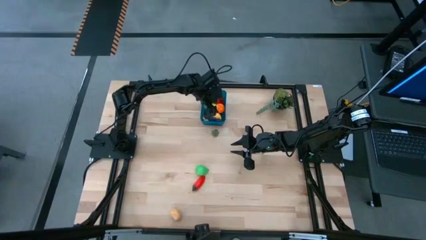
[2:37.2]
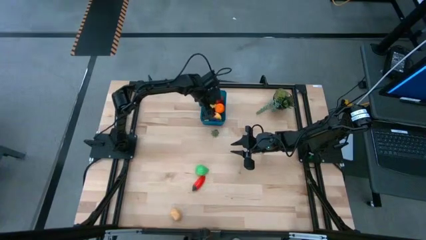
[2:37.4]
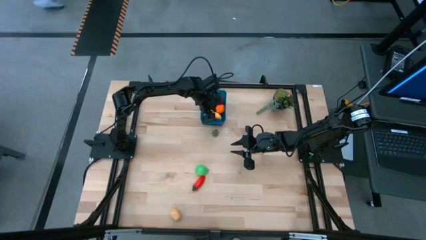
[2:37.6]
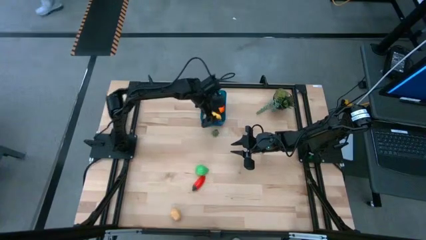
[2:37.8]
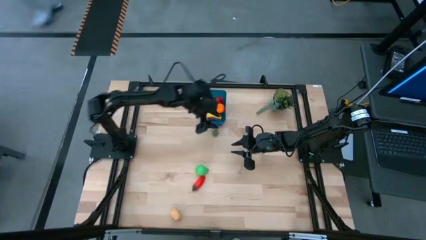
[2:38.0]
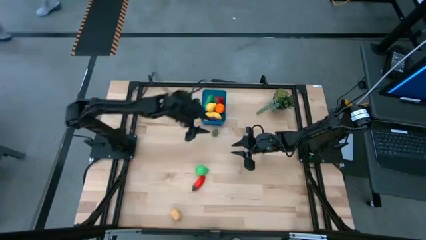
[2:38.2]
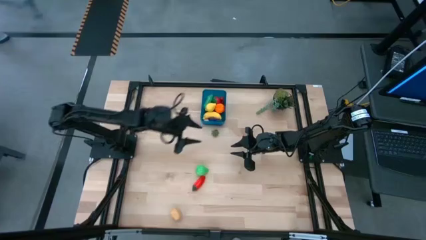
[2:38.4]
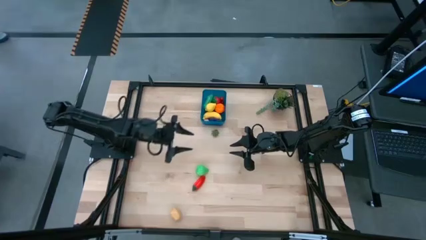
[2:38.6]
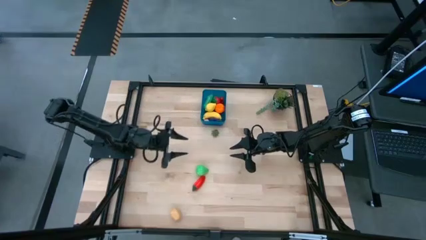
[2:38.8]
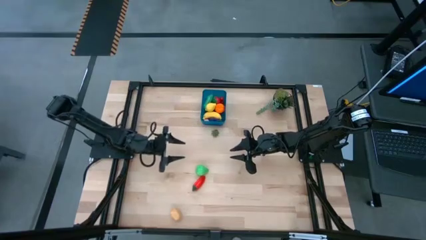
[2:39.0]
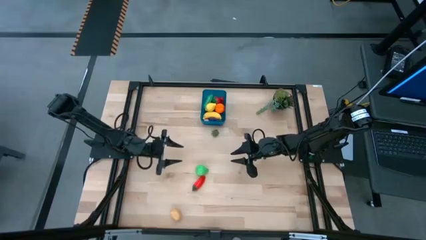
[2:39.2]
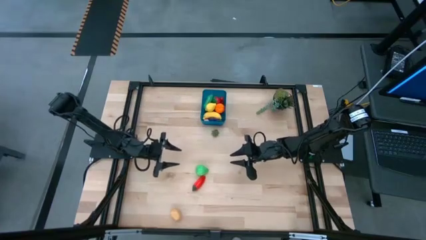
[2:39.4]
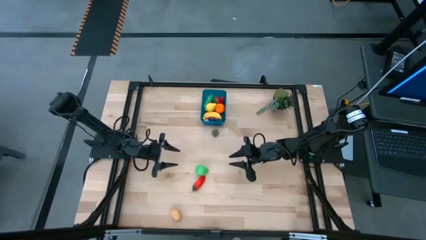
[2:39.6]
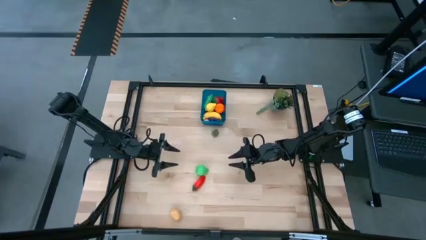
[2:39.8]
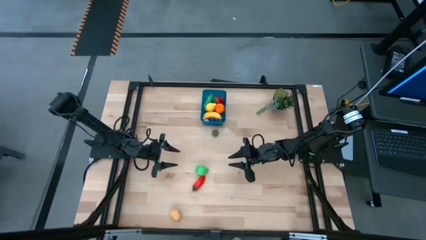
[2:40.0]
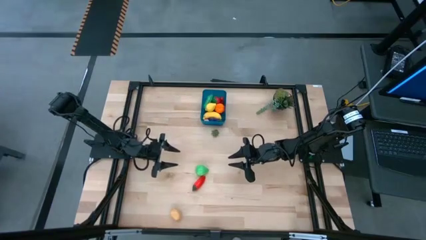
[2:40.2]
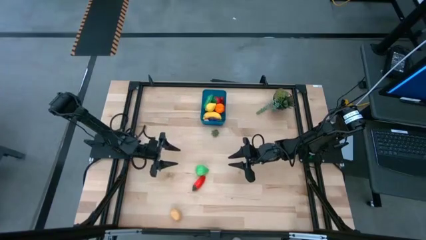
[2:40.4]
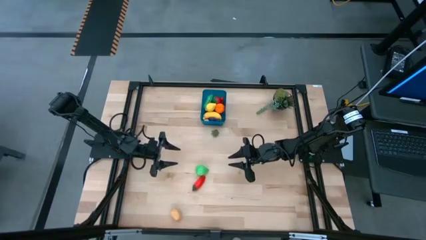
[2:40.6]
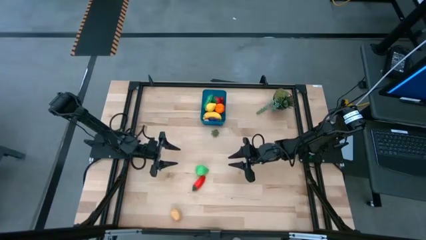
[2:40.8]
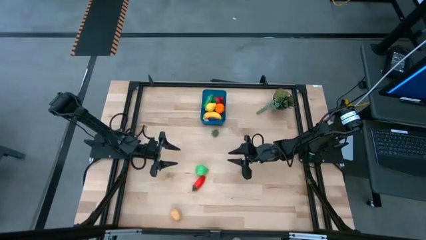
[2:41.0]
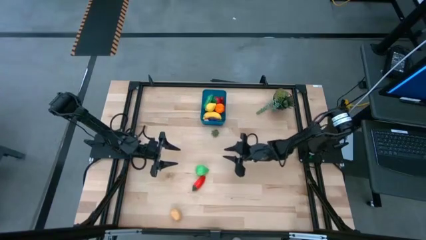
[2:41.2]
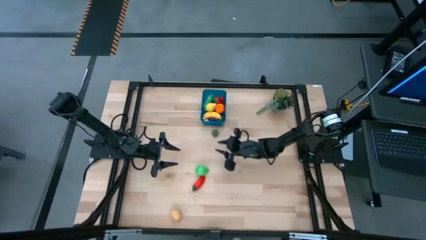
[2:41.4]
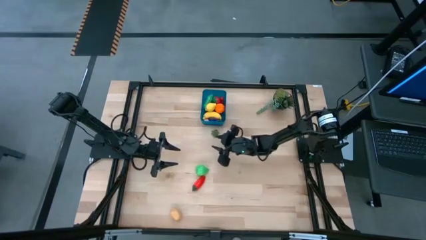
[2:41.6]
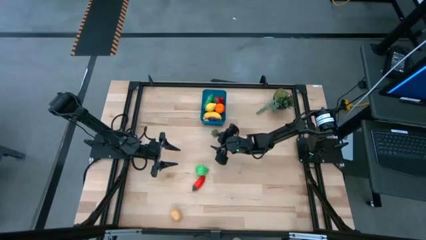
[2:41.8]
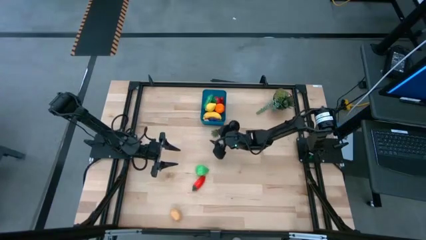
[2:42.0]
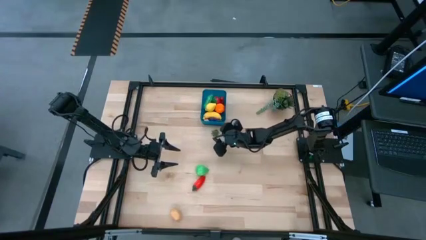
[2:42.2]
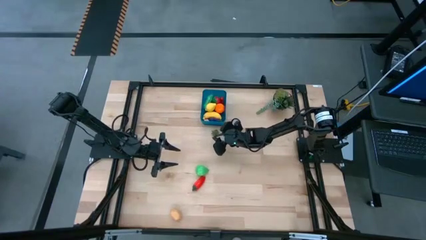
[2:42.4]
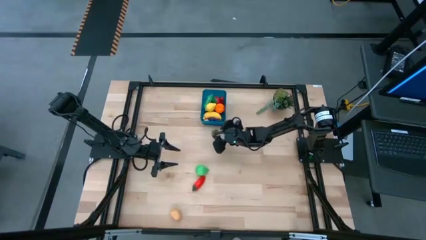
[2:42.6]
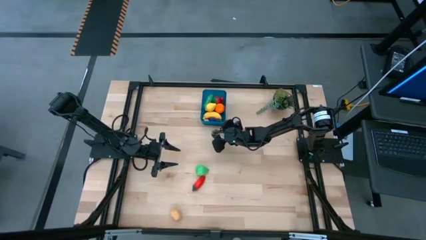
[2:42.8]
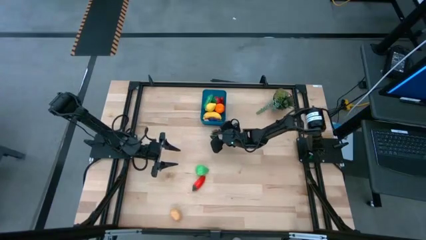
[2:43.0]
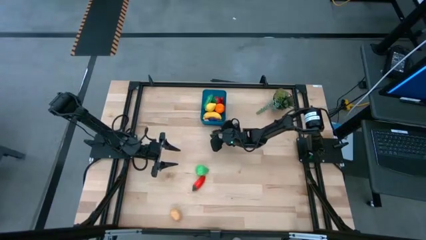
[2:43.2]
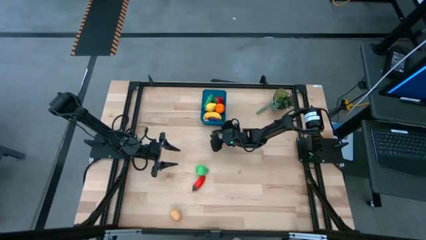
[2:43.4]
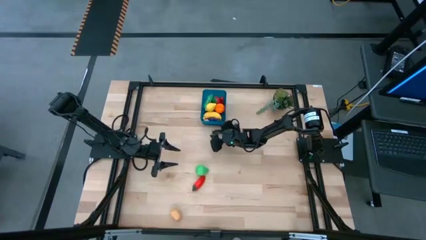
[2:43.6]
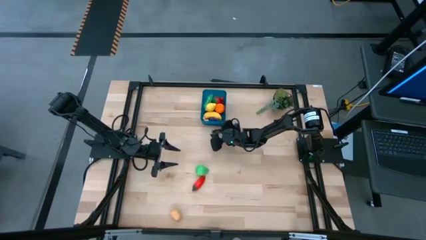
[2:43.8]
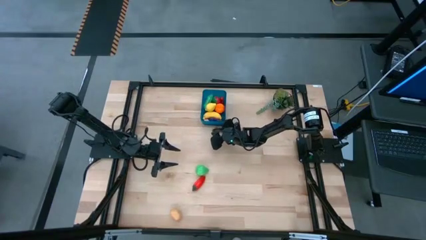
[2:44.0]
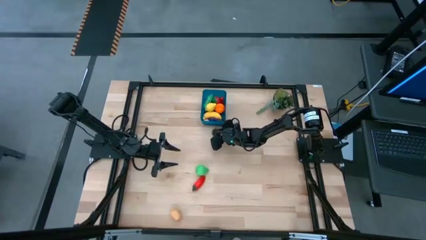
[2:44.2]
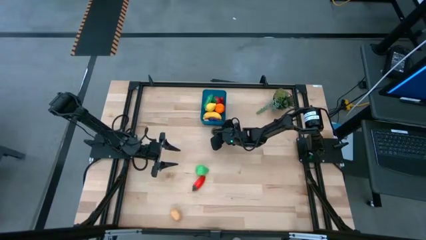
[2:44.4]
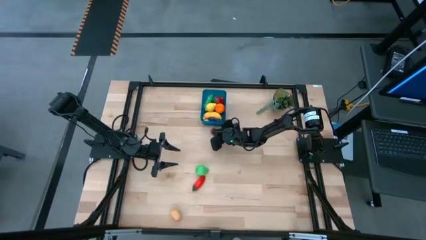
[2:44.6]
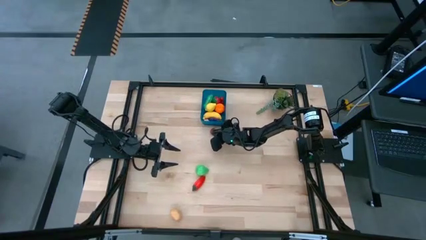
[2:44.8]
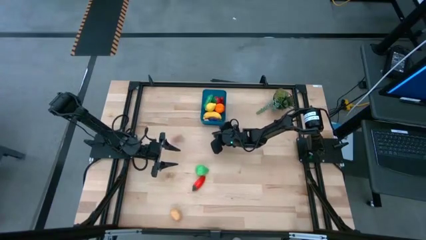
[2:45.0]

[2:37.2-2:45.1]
Task: Pick and placing Produce into tupperware
Put the strawberry into the blue bin

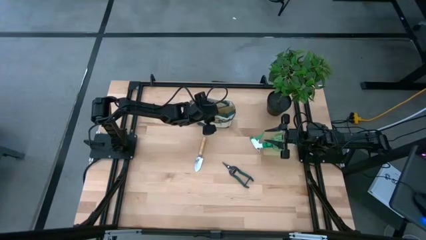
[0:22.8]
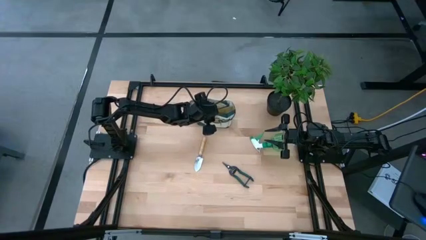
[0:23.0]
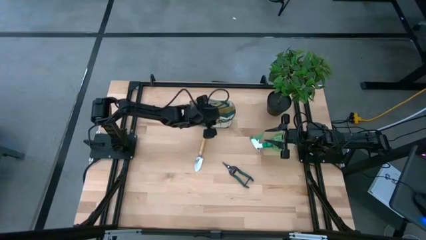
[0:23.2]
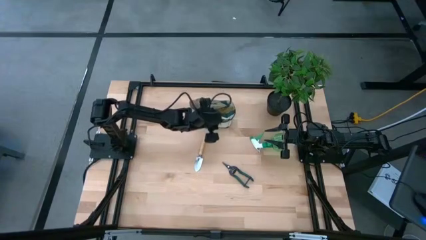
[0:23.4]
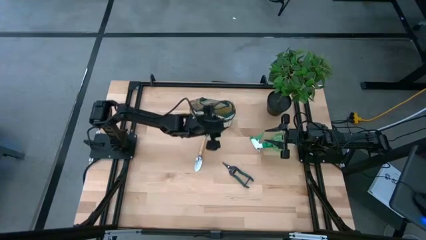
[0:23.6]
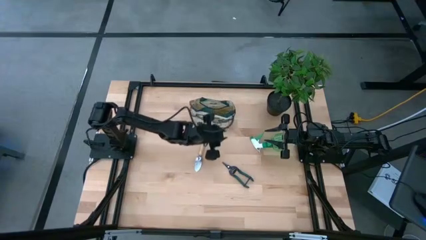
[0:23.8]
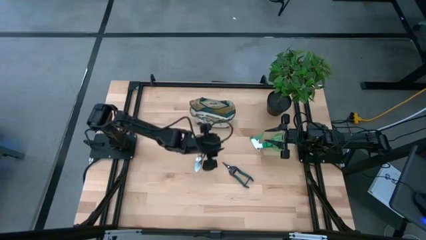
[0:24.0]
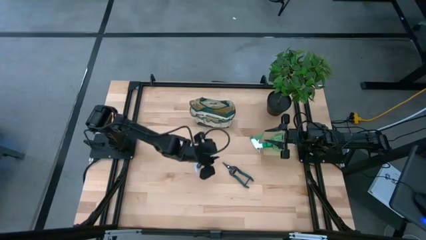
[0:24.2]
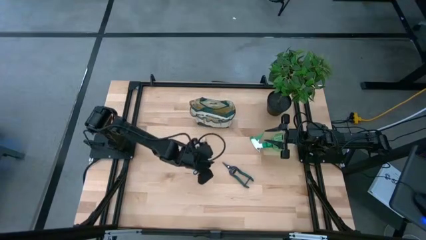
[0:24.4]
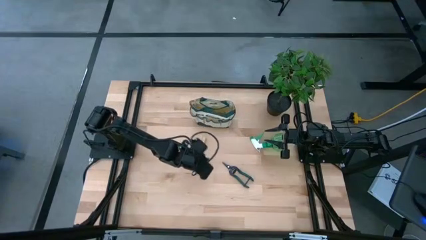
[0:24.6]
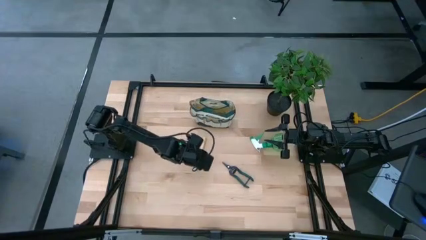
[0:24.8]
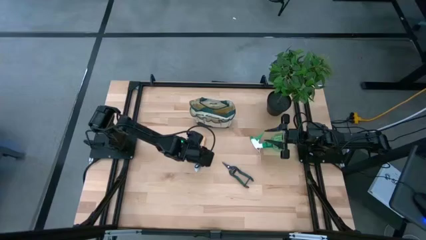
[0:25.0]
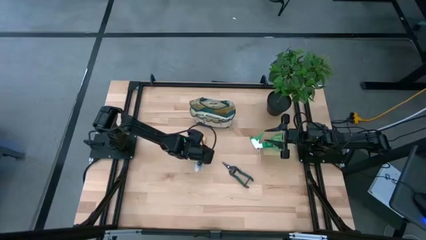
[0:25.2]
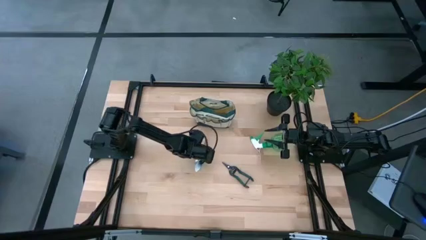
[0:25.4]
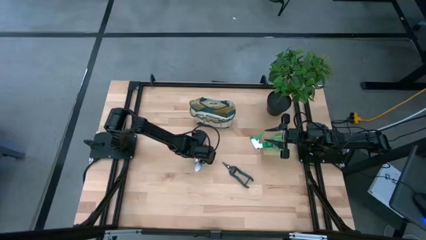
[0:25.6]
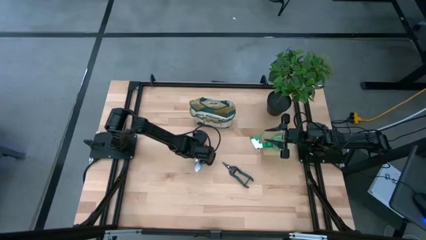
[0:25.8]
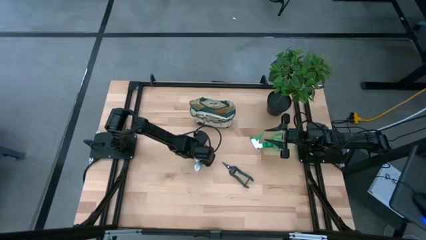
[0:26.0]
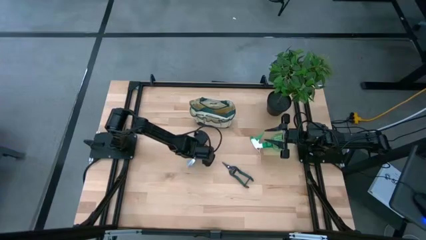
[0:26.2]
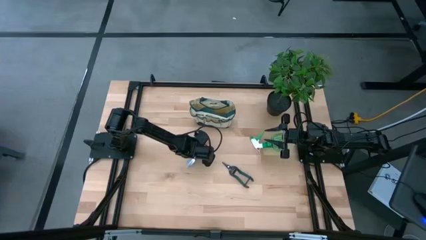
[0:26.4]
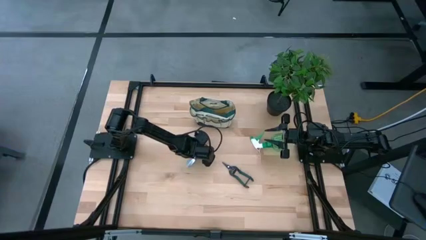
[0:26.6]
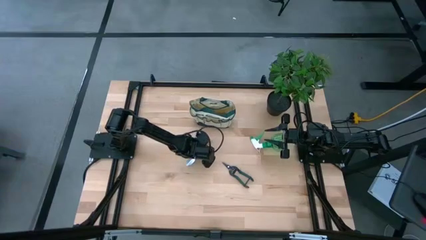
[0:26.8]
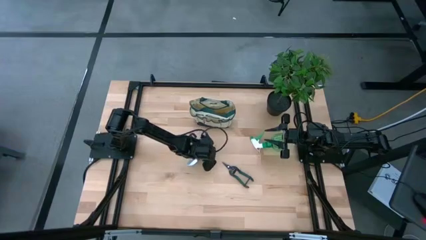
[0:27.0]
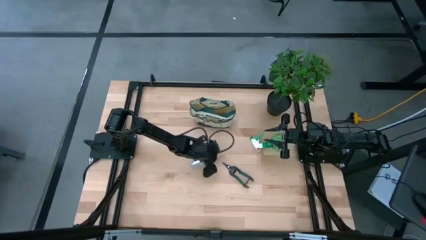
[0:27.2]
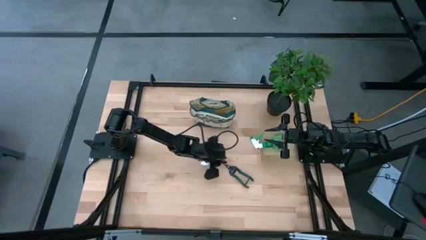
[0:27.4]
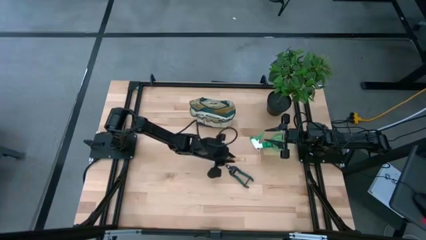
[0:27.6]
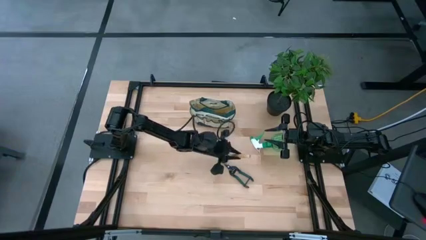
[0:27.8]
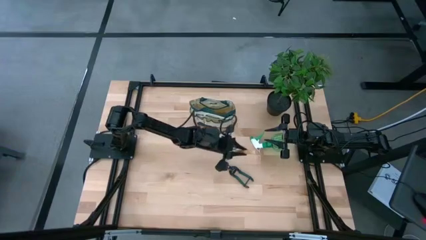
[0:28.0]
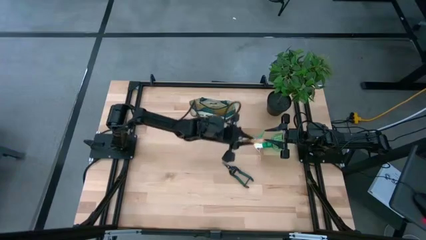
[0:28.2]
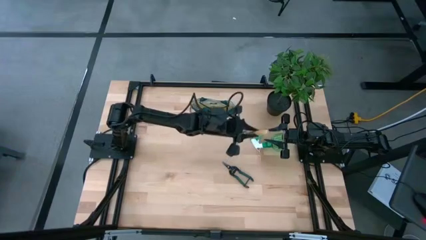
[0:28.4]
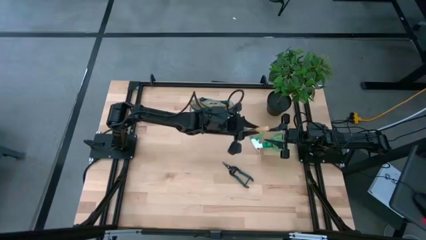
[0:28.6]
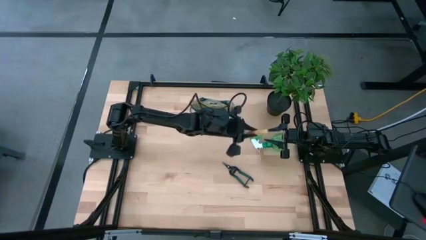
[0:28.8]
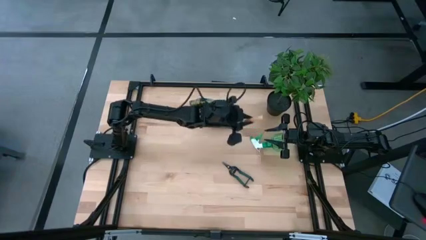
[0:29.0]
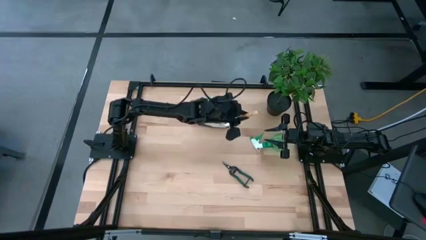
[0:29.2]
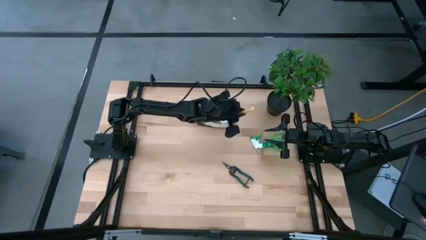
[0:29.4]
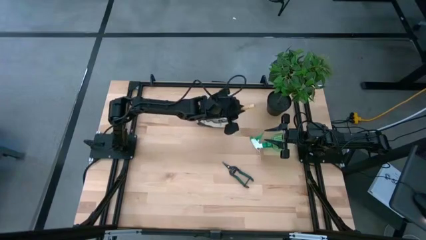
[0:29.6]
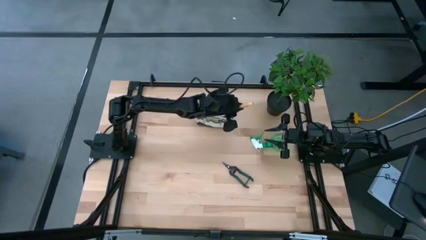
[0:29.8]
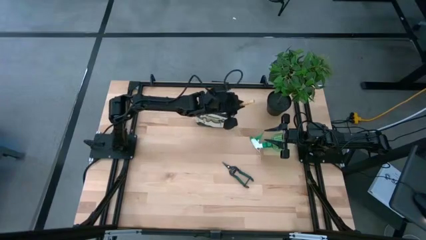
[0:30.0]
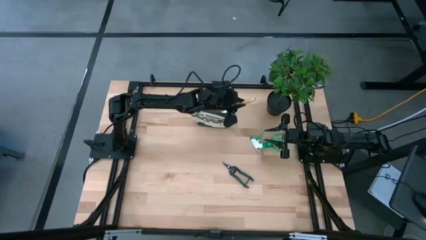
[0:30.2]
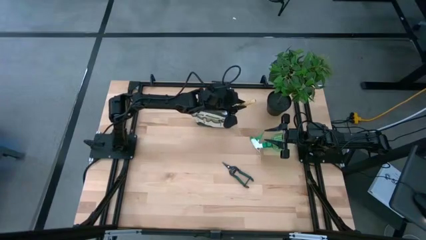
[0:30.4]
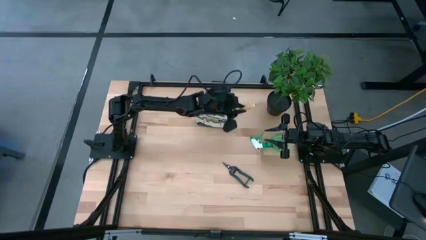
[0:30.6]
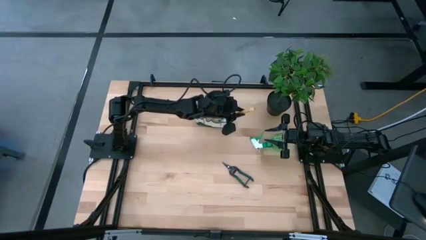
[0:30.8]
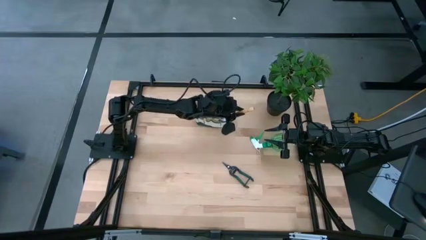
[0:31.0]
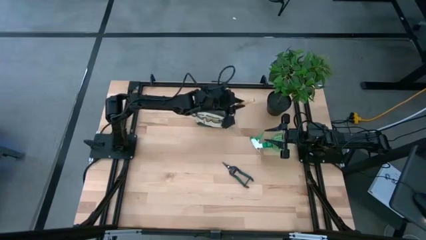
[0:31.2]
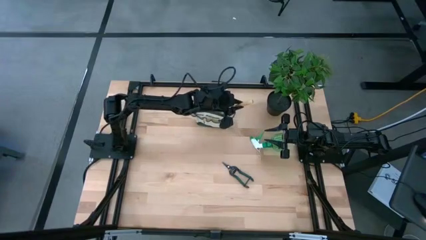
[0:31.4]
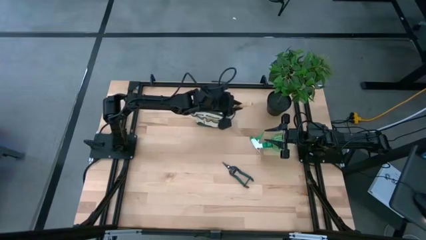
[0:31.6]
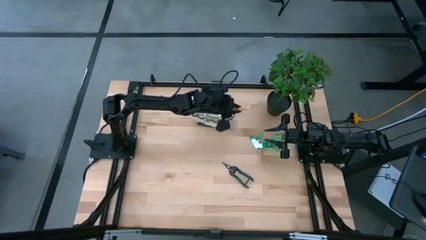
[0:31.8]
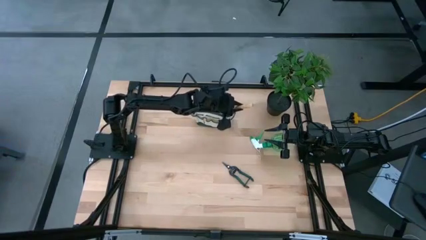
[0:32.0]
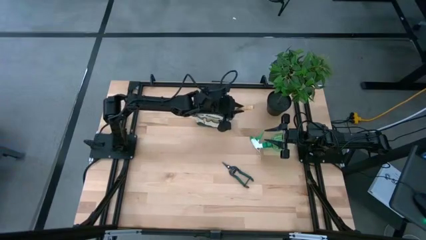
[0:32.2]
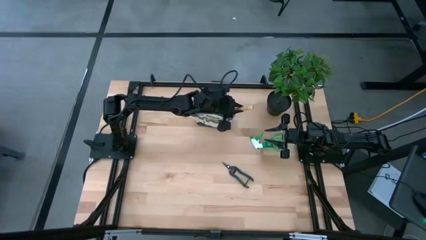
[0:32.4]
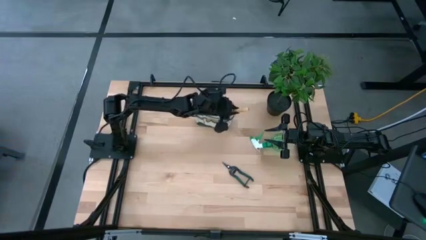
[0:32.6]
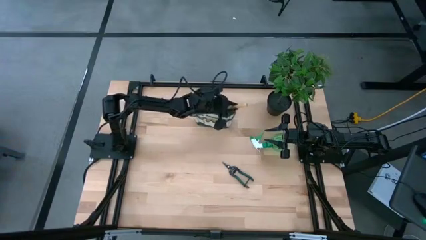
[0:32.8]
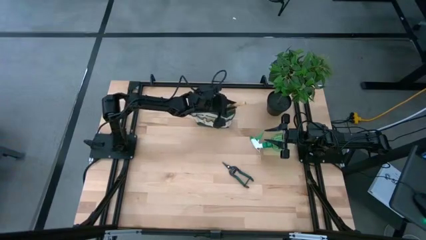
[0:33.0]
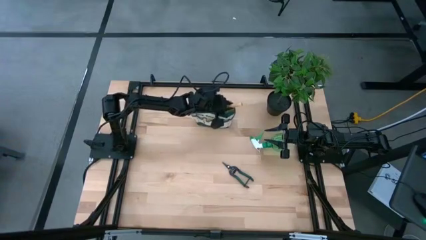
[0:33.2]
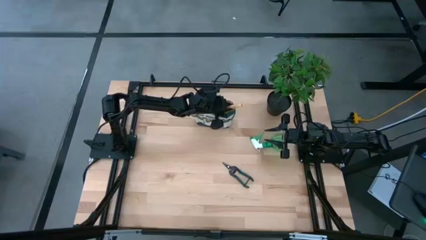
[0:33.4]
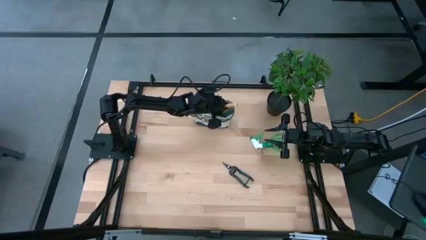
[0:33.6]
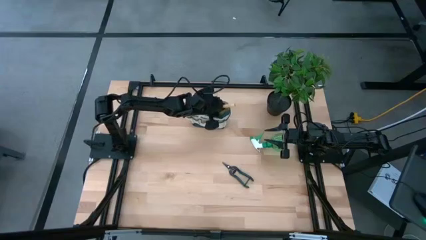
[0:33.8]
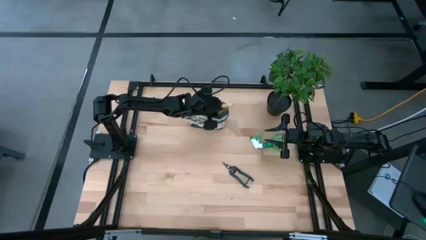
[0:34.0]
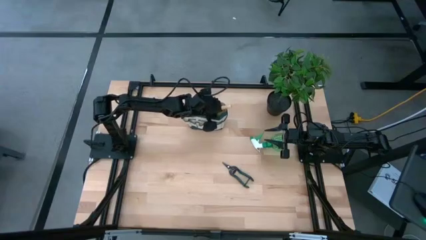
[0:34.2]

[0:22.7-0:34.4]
Task: Pick & Place Garden tools in Gardening bag
Put the brown trowel into the light brown gardening bag
